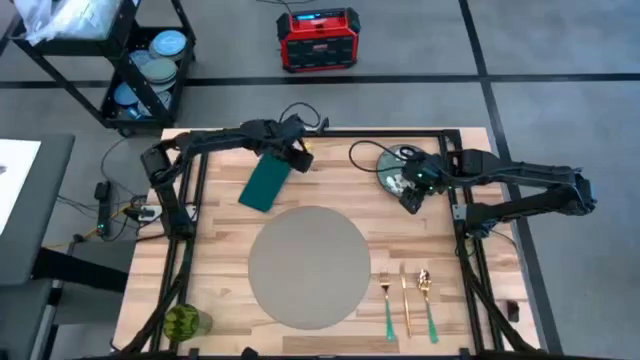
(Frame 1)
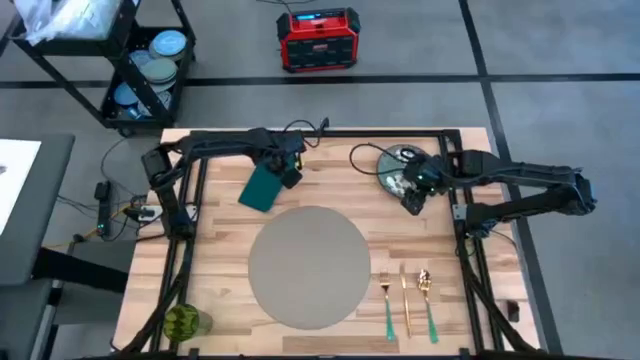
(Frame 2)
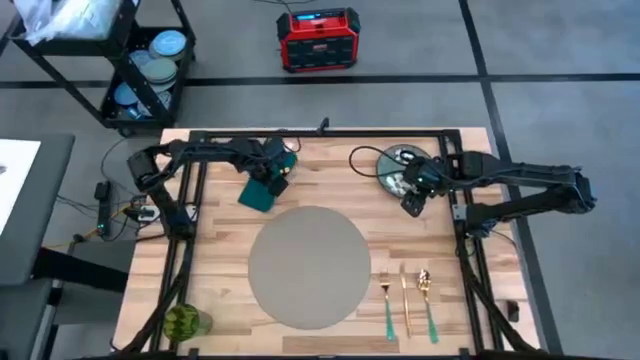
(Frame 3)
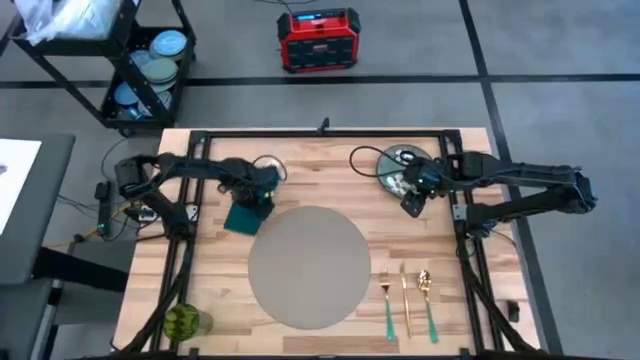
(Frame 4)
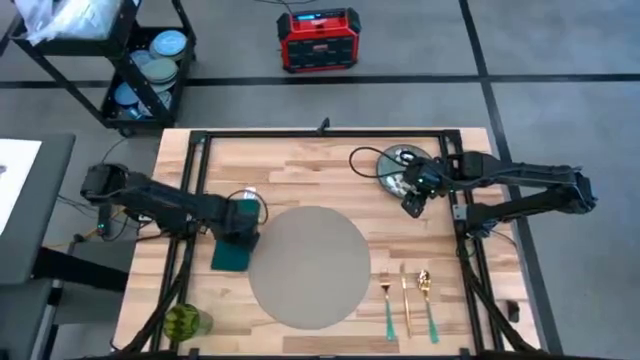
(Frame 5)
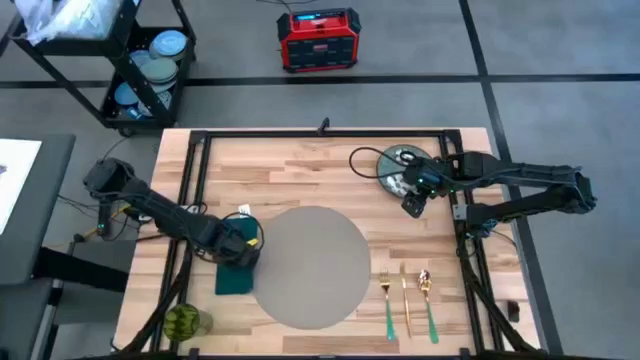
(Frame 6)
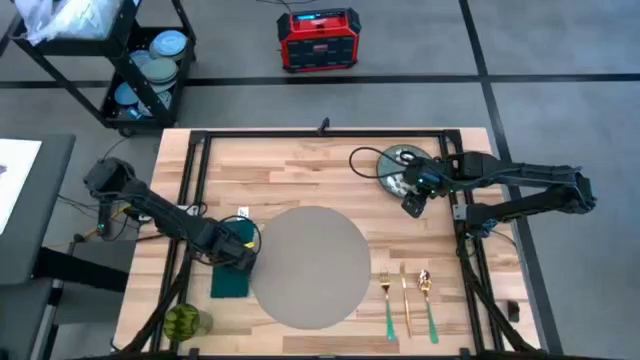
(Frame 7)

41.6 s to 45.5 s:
Task: Set table place
Move the green table napkin beside the gray table placemat

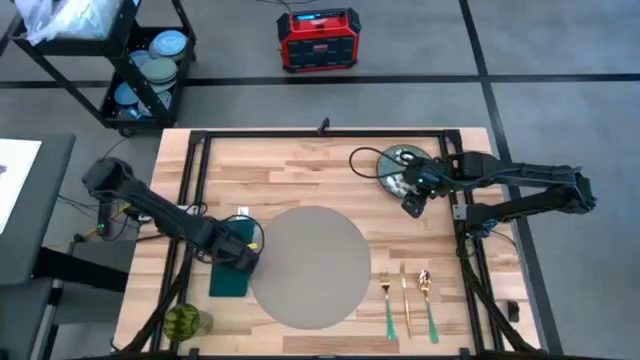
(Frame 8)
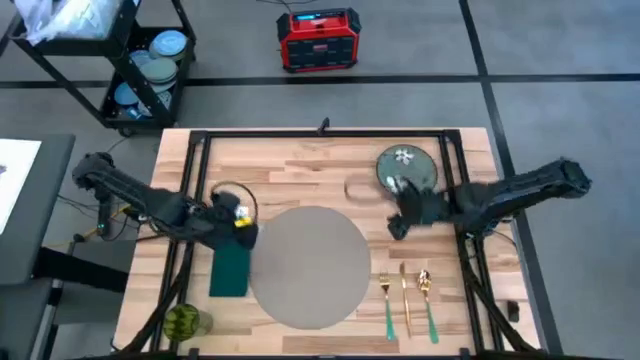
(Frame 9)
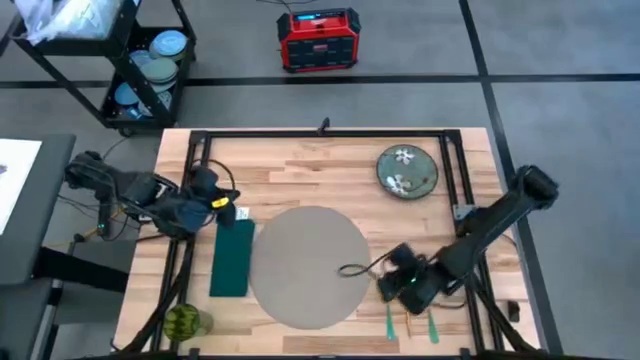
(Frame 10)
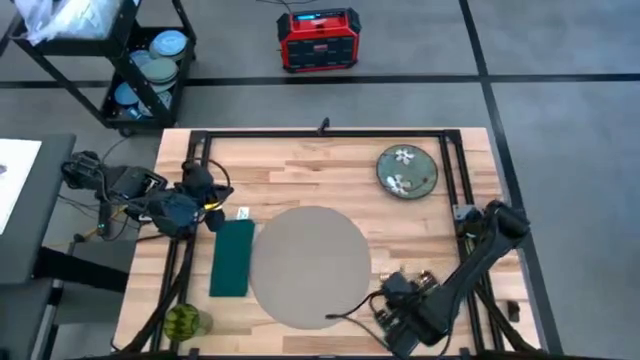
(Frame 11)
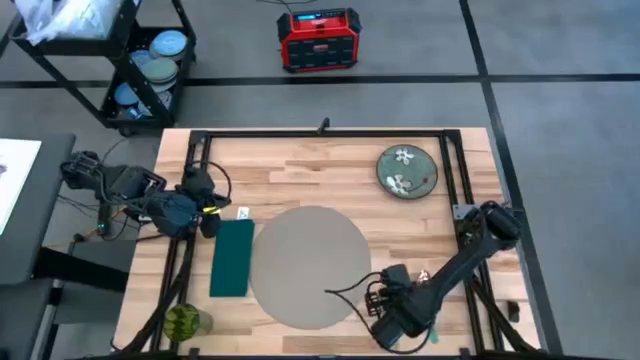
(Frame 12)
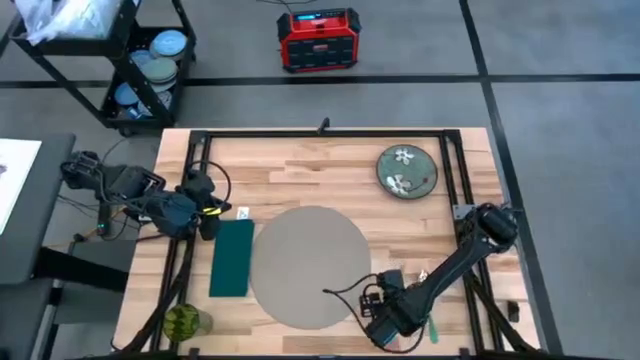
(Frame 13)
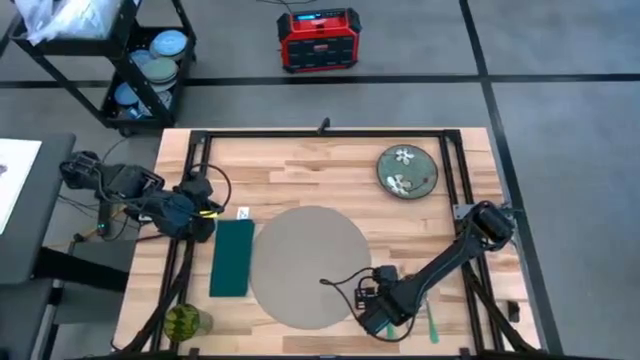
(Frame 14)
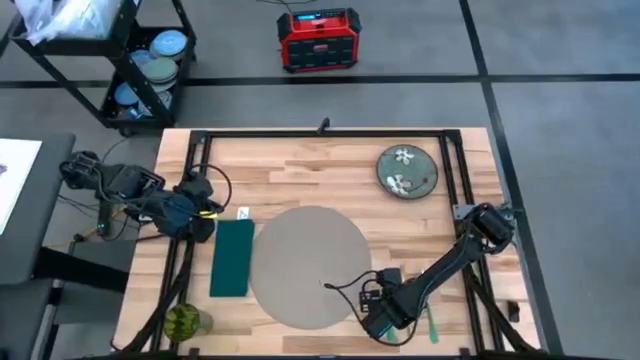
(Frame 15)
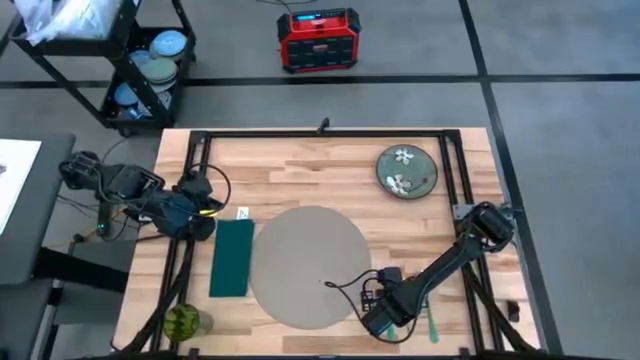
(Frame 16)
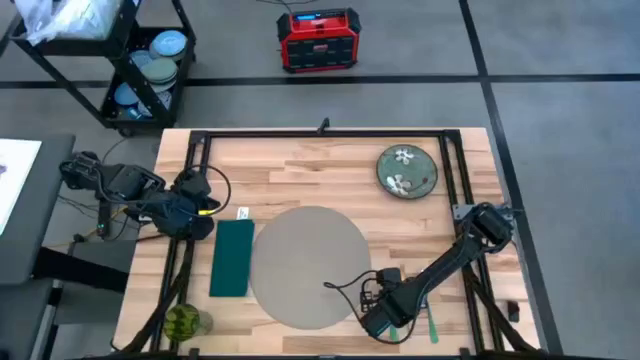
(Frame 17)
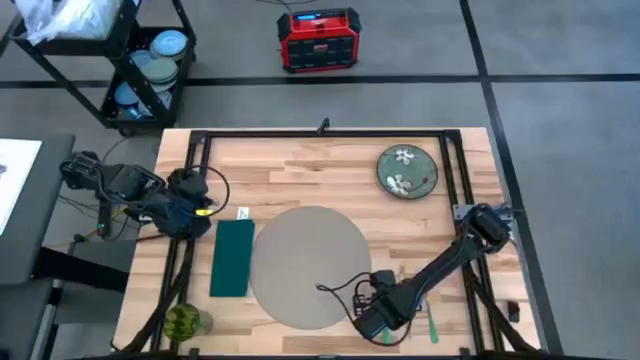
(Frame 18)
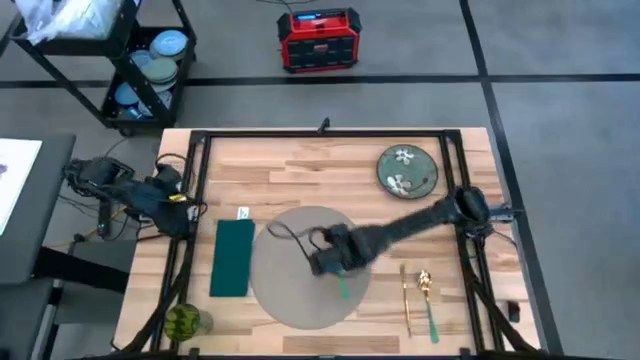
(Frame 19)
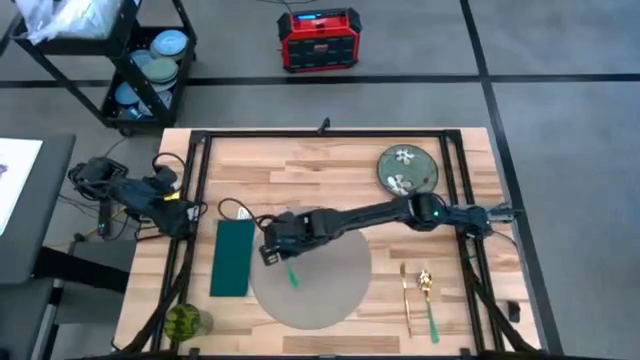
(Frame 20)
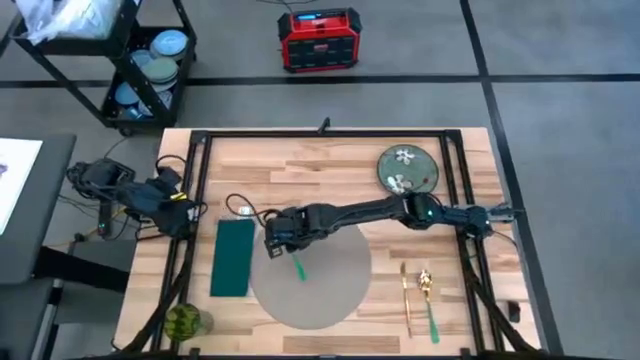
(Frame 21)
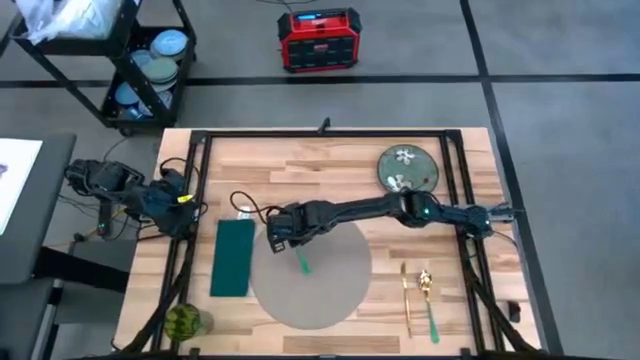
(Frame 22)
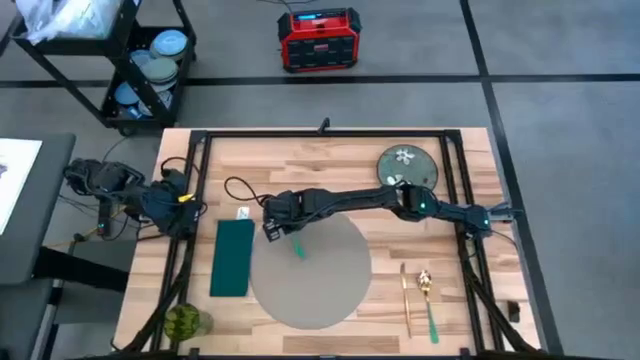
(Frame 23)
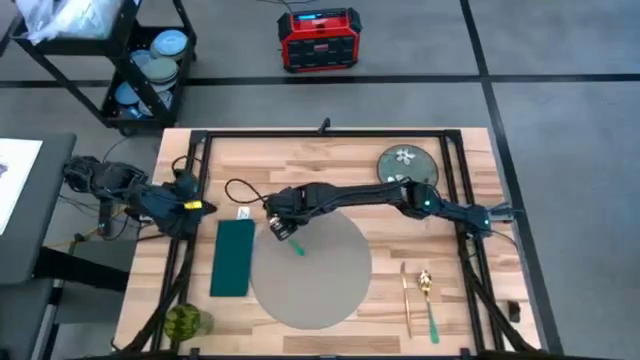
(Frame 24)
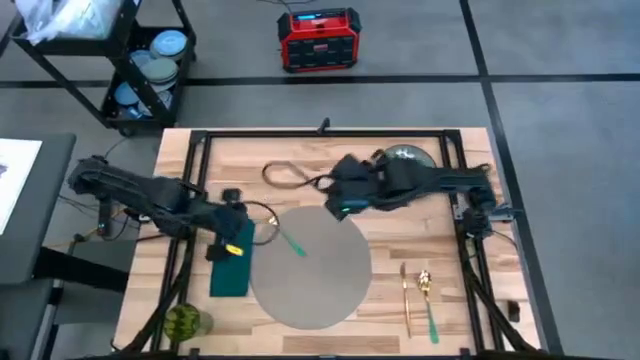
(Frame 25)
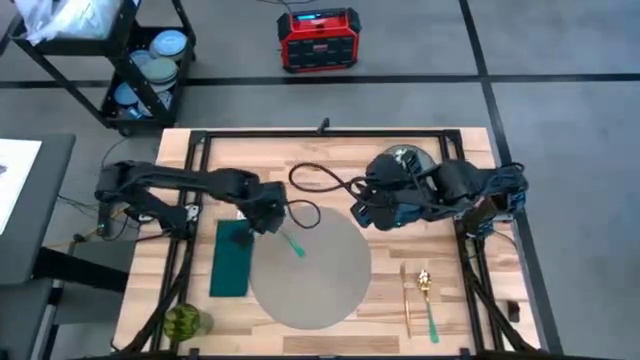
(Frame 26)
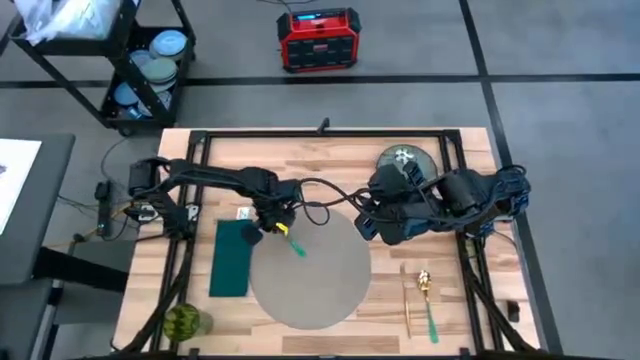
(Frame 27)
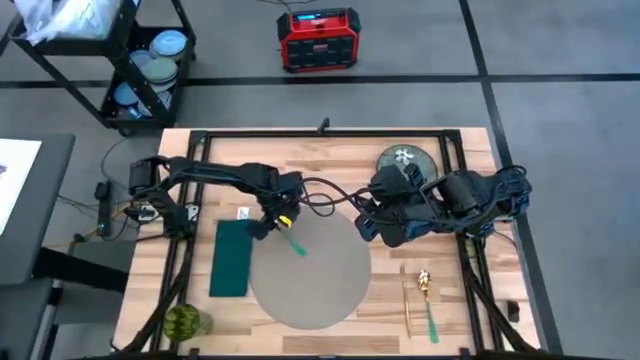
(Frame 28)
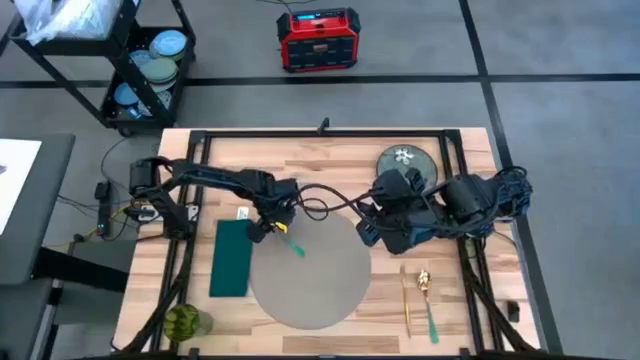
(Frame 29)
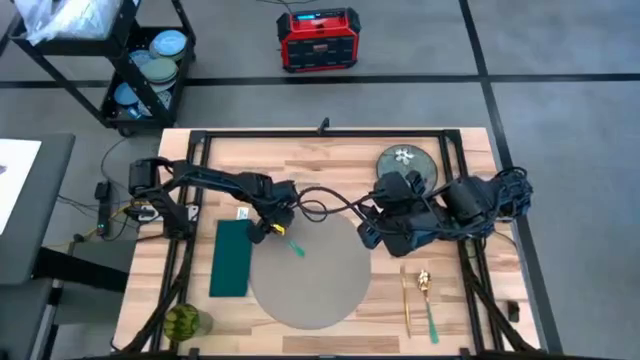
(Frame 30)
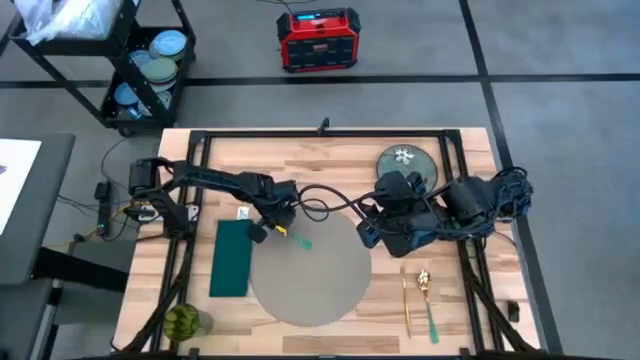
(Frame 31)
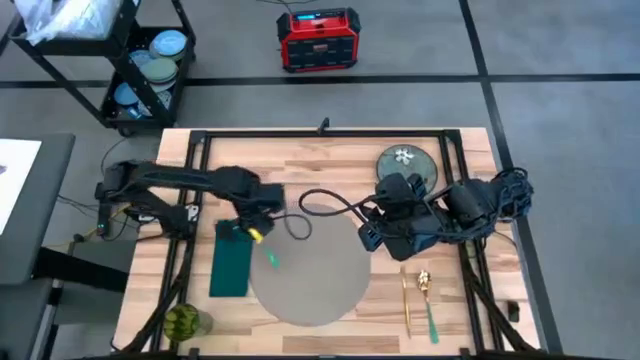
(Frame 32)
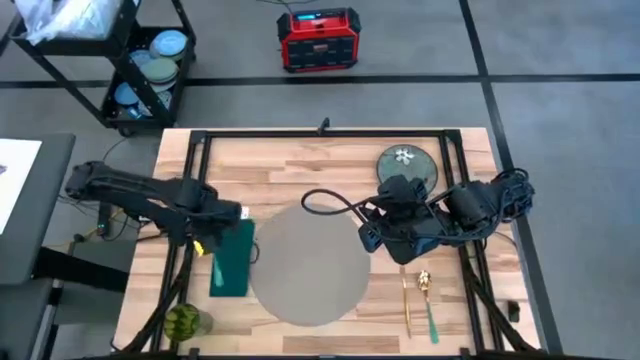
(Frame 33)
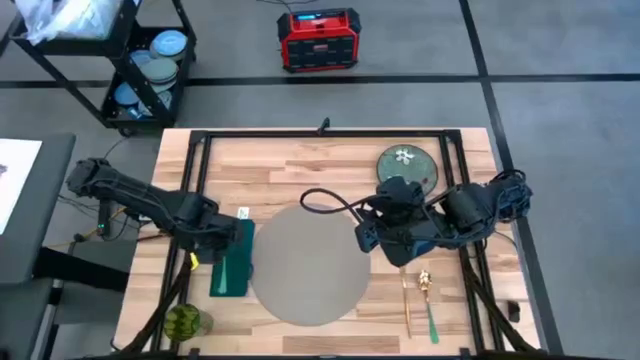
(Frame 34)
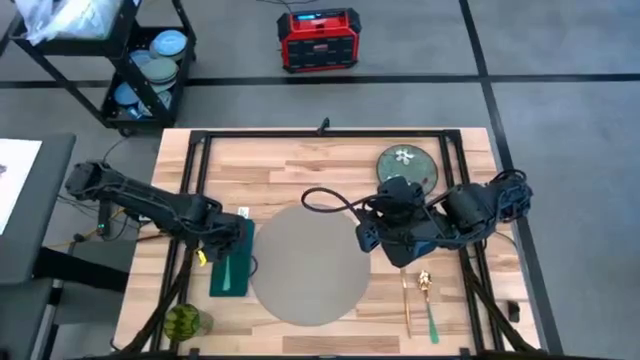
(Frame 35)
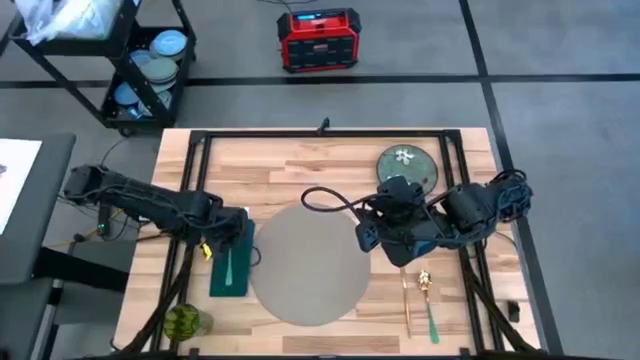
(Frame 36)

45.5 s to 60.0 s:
Put the green fork on top of the blue table napkin

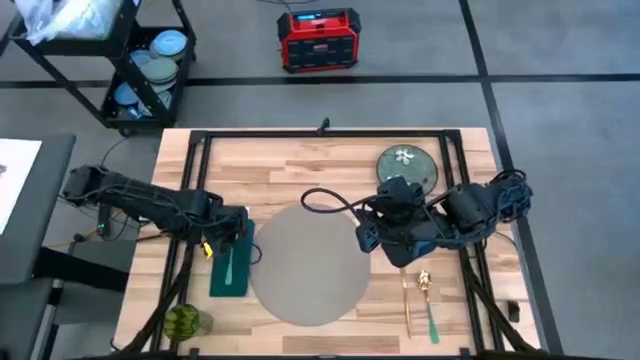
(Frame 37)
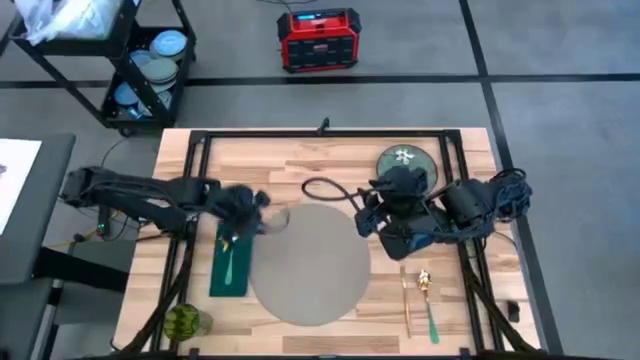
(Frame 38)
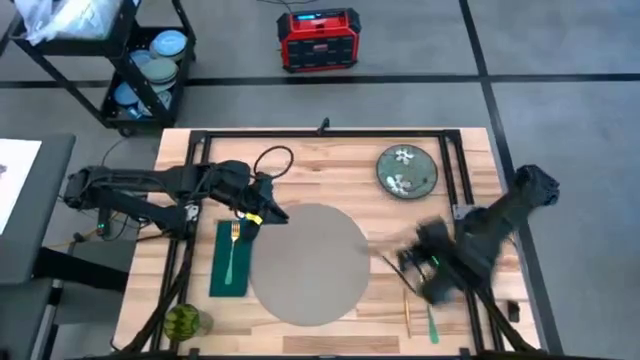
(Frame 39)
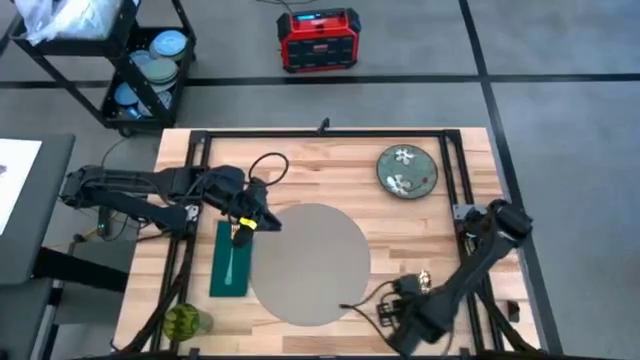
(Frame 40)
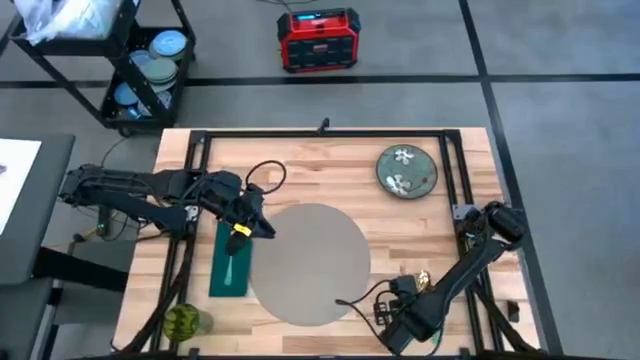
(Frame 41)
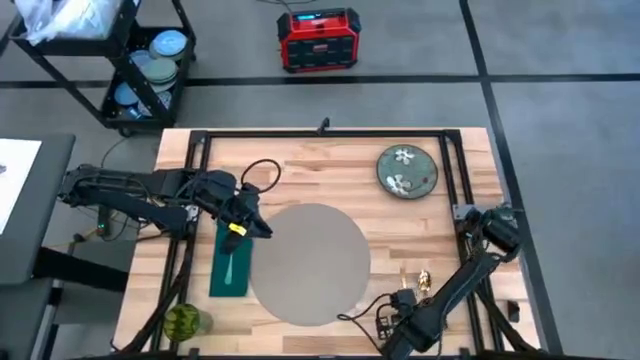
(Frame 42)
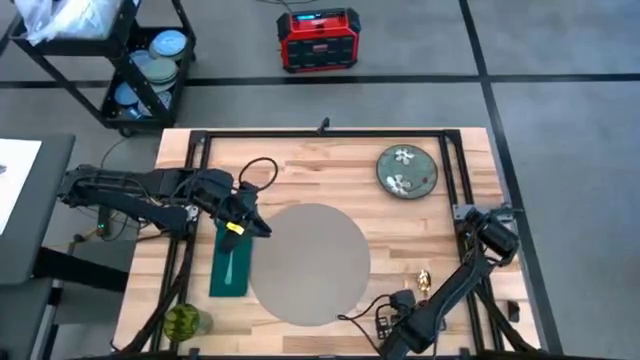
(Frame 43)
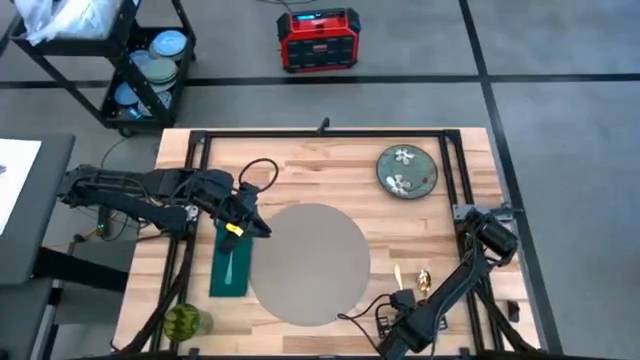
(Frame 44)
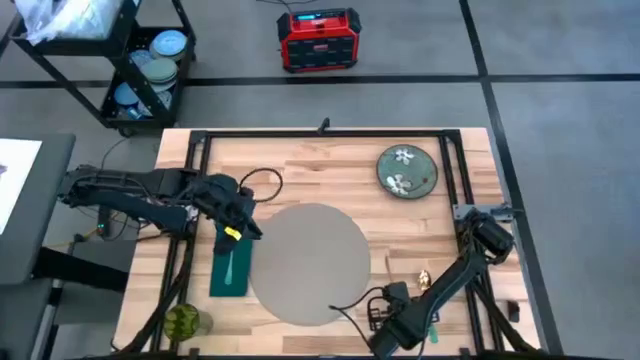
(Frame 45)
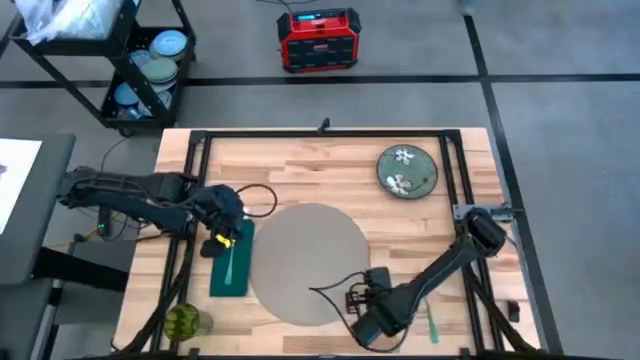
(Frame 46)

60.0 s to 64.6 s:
Put the gold table knife on the gray table placemat
